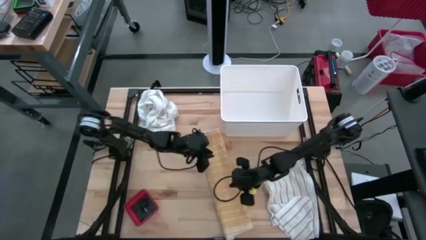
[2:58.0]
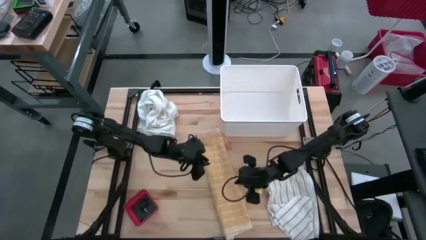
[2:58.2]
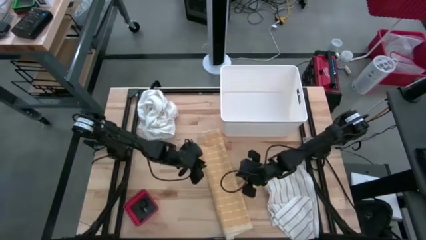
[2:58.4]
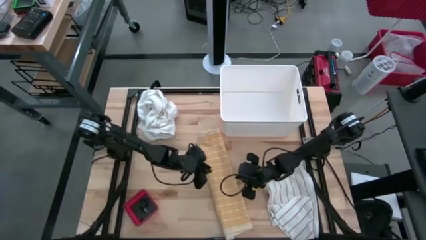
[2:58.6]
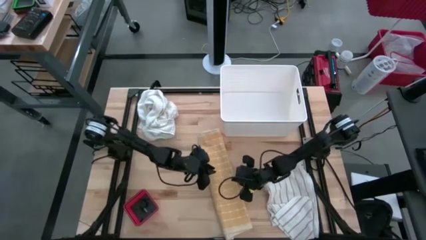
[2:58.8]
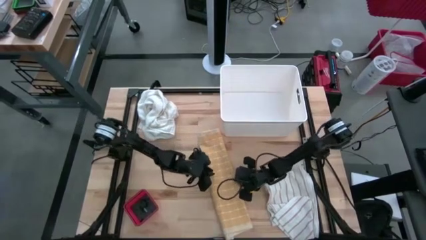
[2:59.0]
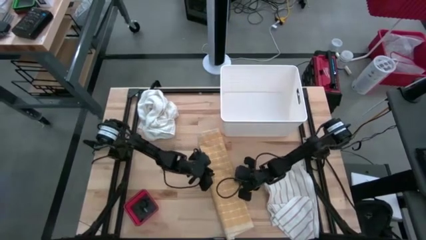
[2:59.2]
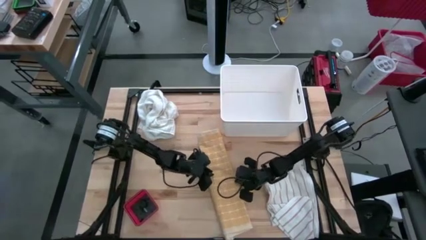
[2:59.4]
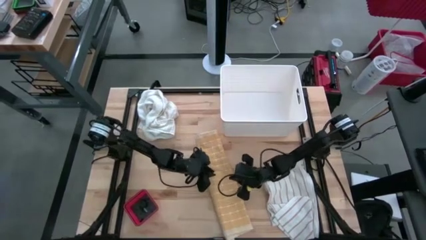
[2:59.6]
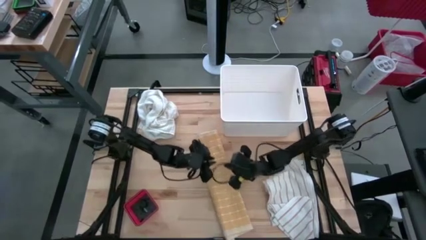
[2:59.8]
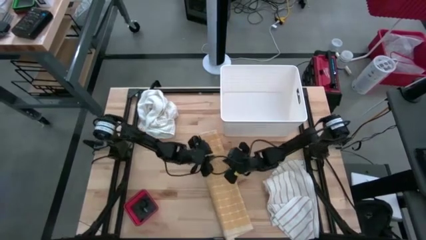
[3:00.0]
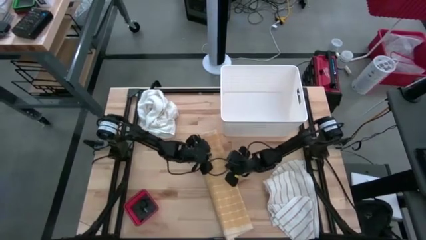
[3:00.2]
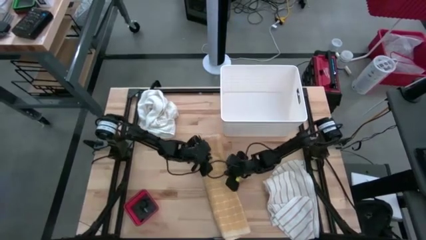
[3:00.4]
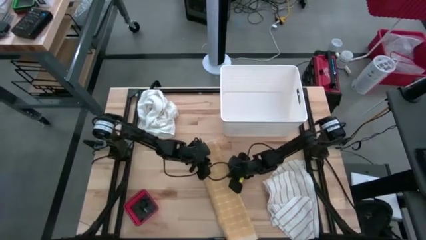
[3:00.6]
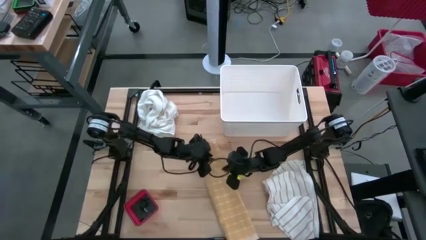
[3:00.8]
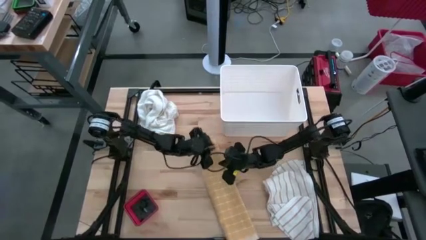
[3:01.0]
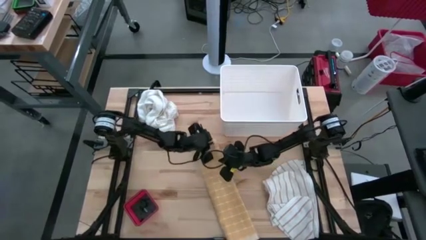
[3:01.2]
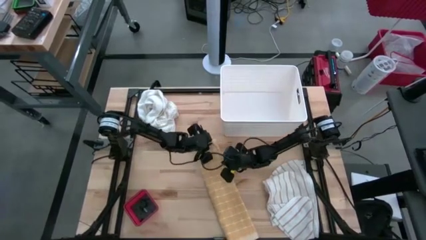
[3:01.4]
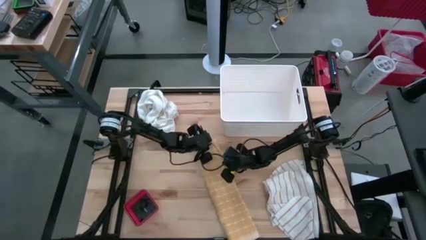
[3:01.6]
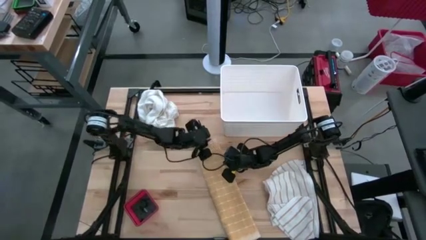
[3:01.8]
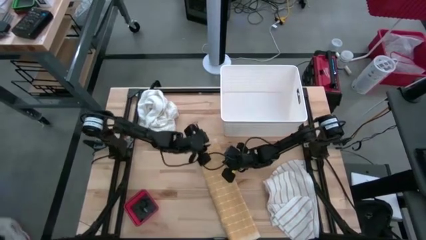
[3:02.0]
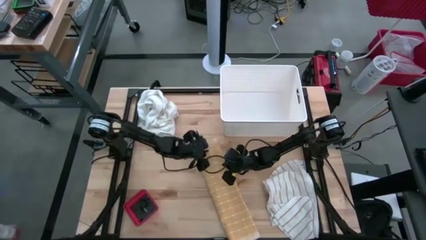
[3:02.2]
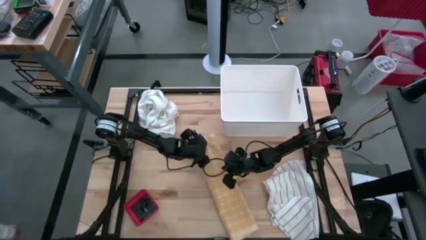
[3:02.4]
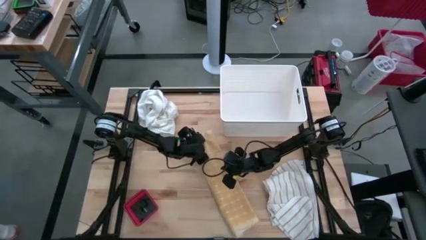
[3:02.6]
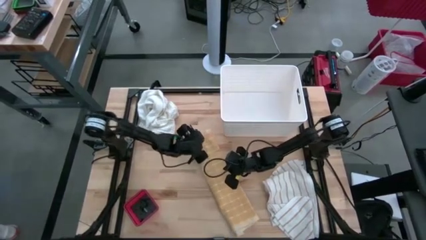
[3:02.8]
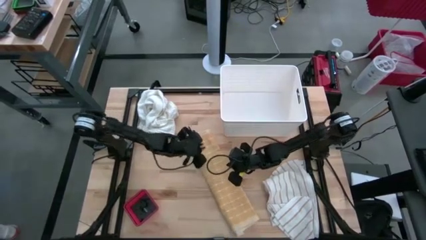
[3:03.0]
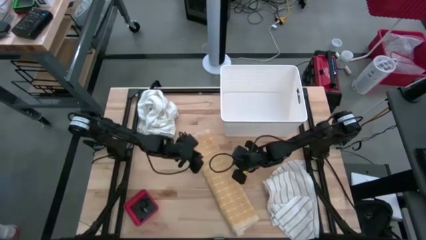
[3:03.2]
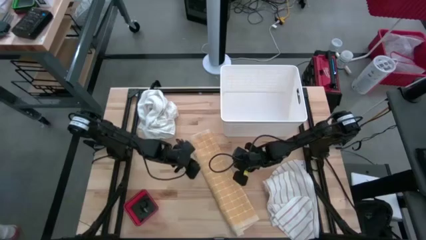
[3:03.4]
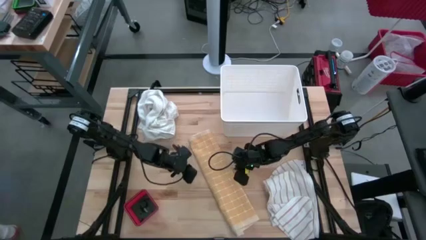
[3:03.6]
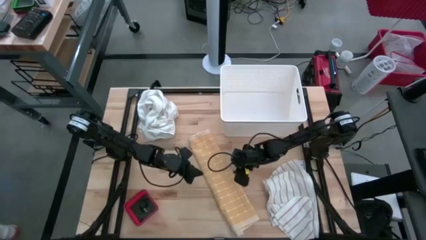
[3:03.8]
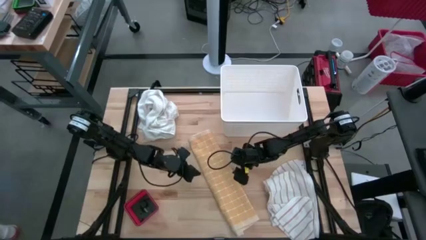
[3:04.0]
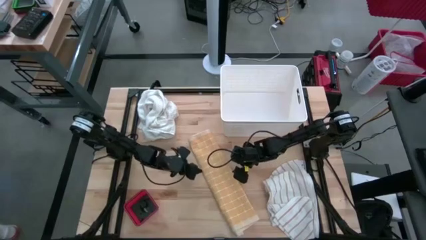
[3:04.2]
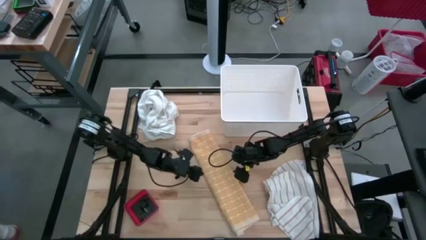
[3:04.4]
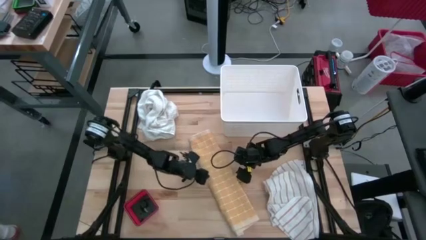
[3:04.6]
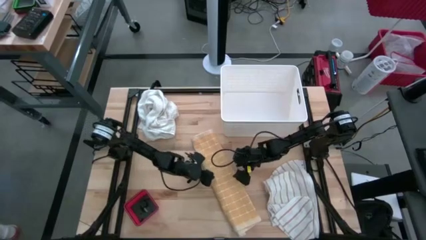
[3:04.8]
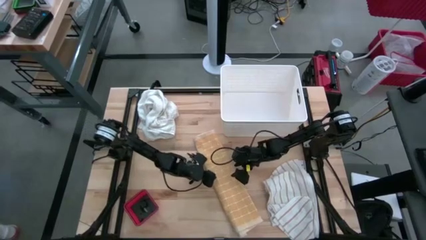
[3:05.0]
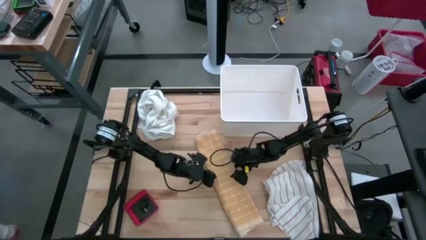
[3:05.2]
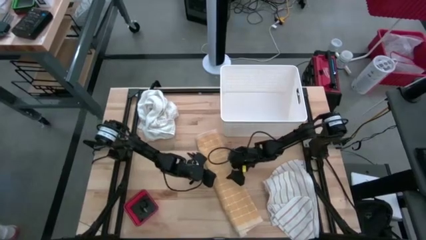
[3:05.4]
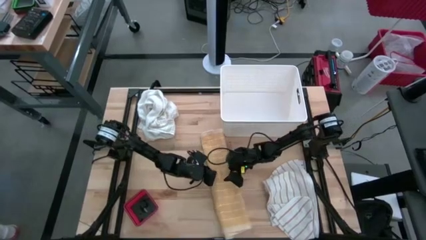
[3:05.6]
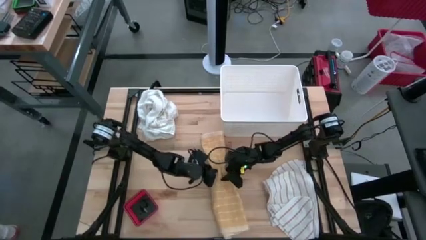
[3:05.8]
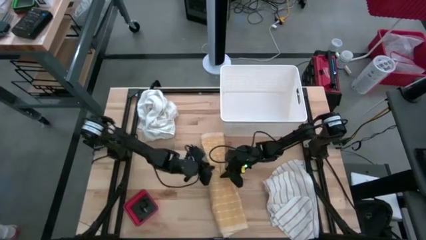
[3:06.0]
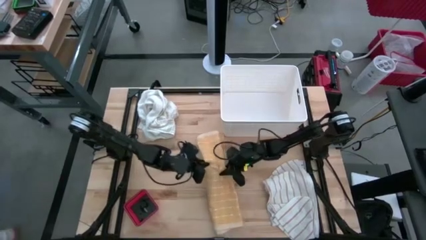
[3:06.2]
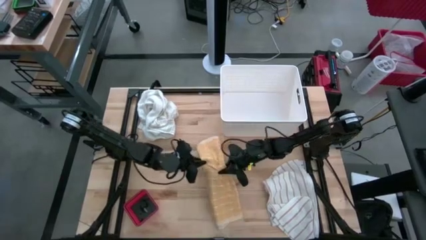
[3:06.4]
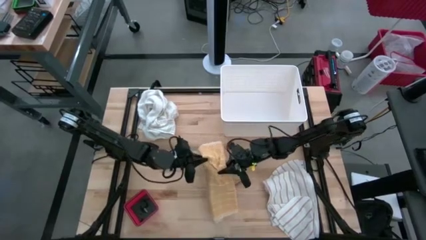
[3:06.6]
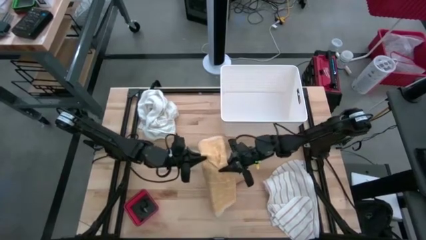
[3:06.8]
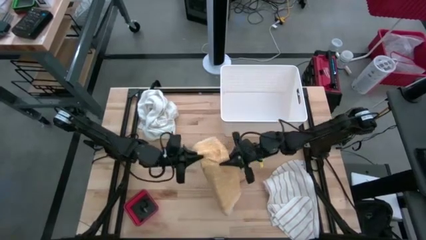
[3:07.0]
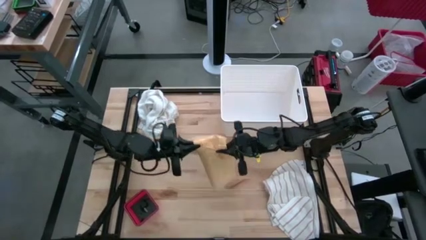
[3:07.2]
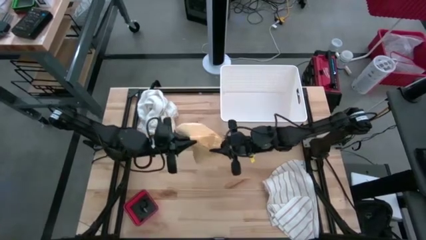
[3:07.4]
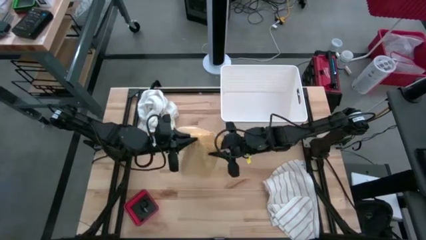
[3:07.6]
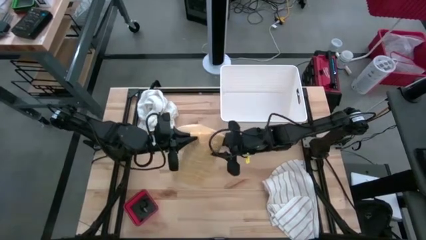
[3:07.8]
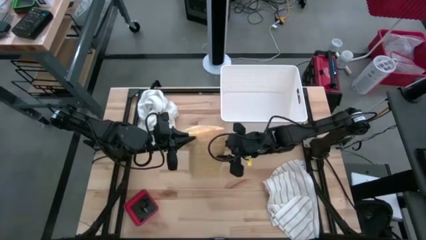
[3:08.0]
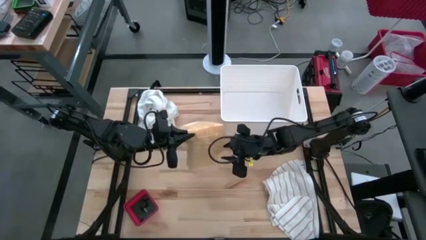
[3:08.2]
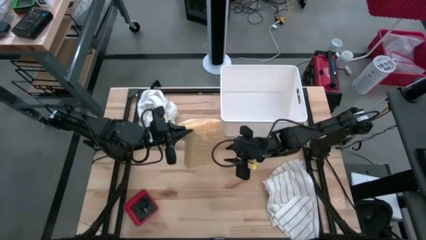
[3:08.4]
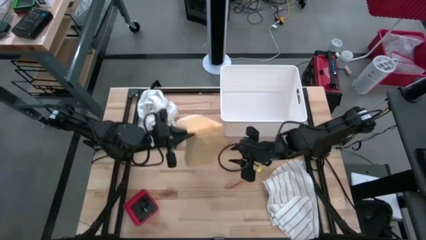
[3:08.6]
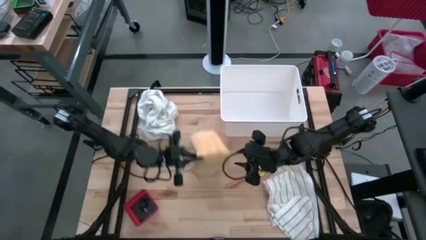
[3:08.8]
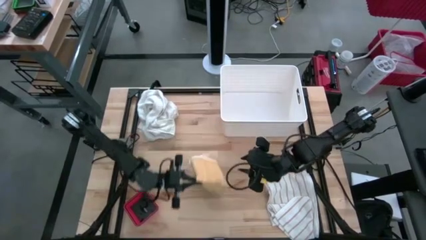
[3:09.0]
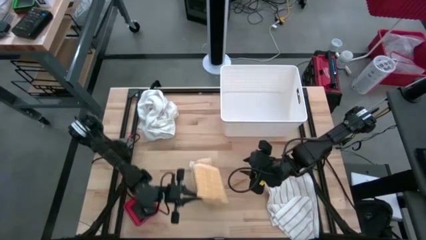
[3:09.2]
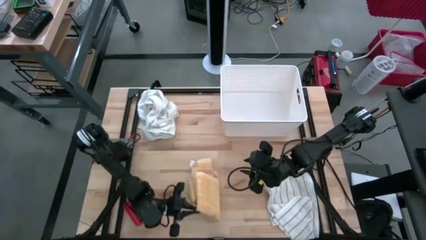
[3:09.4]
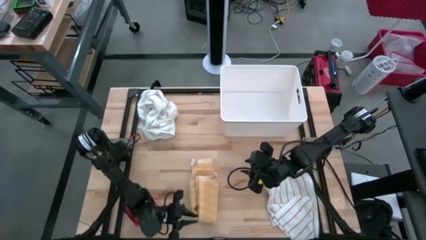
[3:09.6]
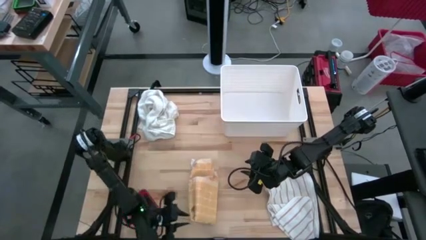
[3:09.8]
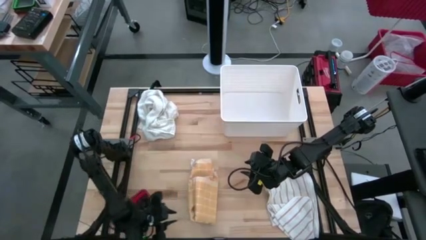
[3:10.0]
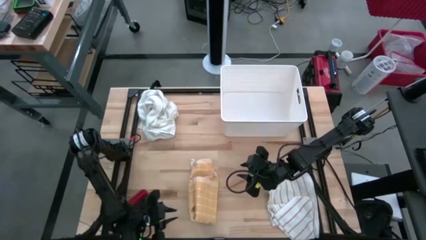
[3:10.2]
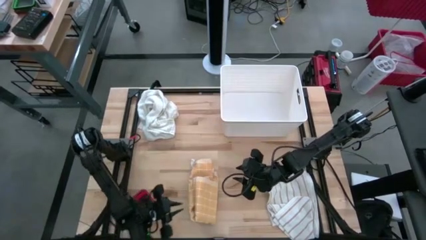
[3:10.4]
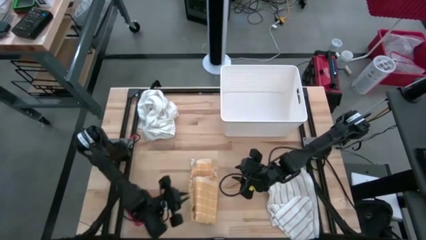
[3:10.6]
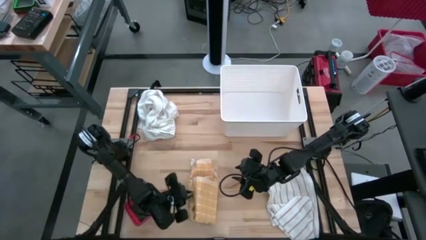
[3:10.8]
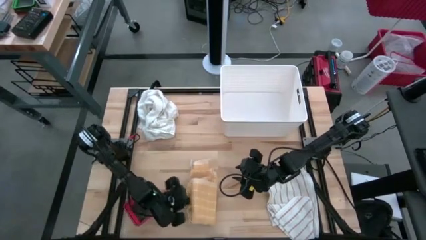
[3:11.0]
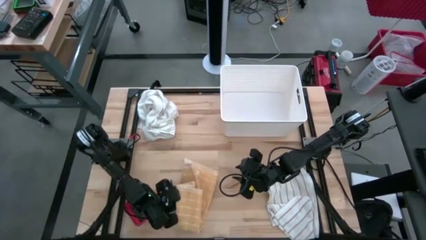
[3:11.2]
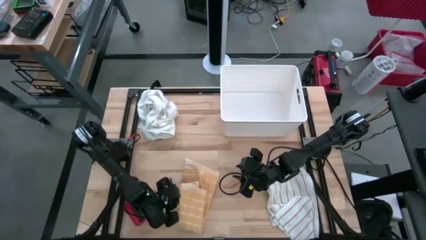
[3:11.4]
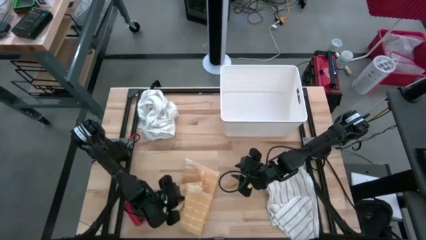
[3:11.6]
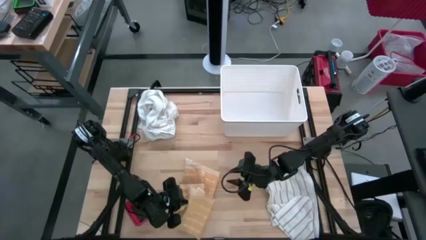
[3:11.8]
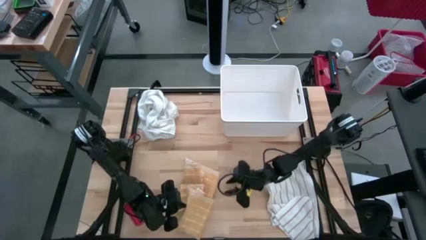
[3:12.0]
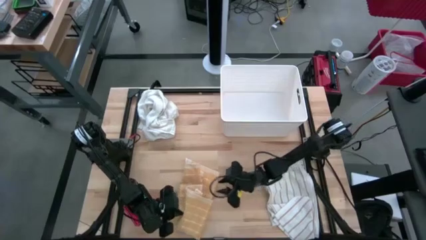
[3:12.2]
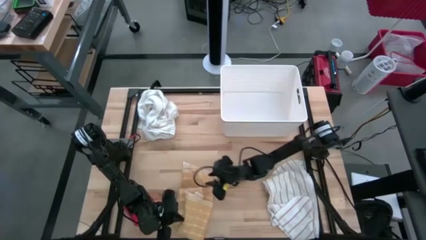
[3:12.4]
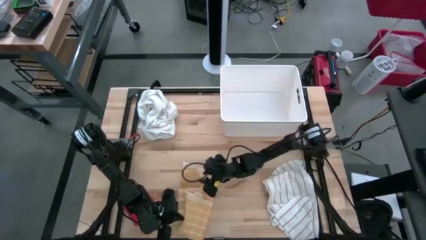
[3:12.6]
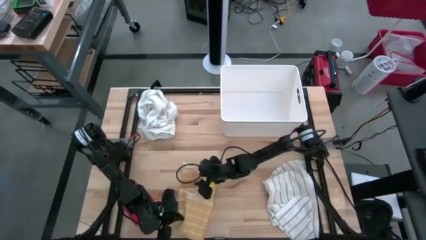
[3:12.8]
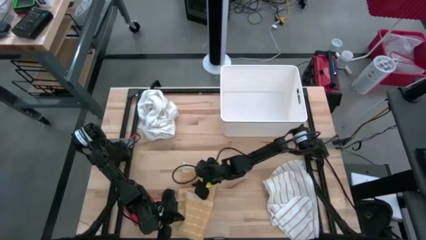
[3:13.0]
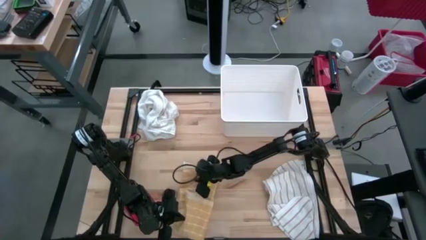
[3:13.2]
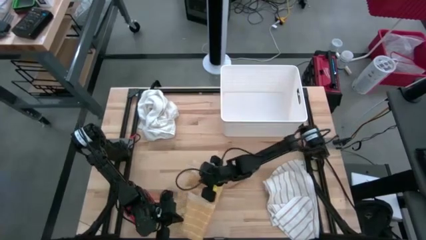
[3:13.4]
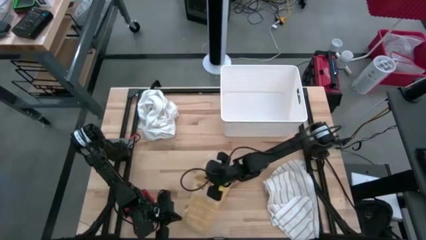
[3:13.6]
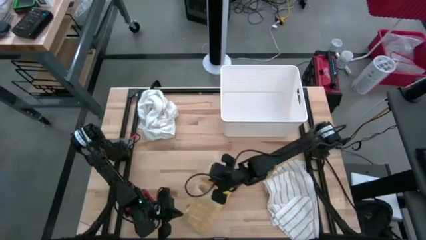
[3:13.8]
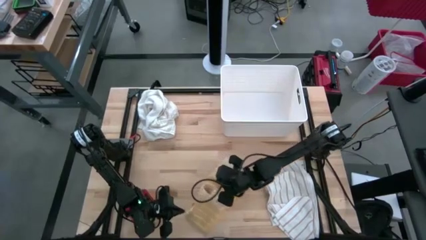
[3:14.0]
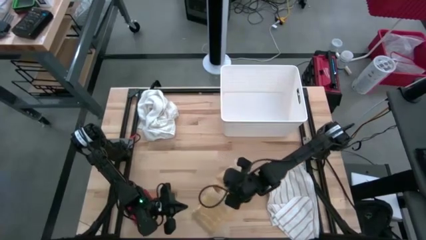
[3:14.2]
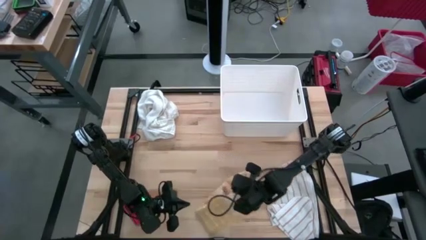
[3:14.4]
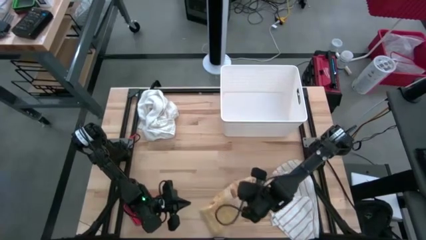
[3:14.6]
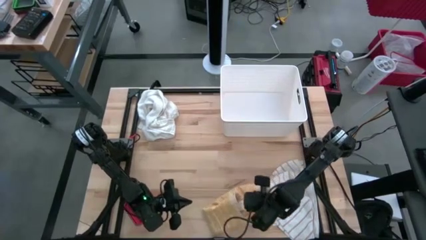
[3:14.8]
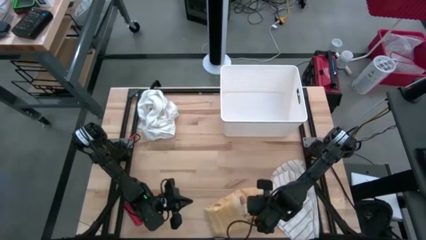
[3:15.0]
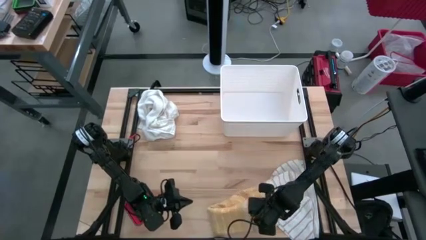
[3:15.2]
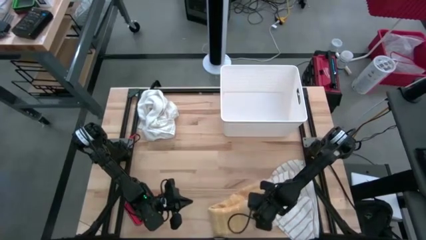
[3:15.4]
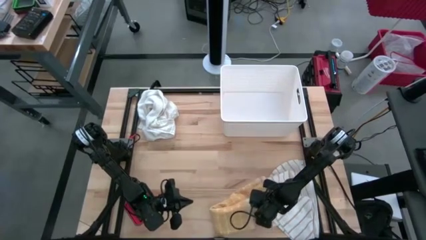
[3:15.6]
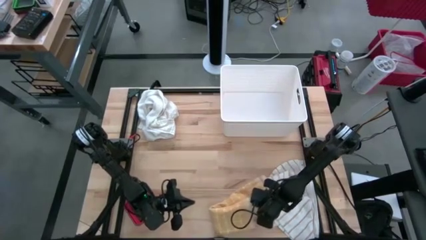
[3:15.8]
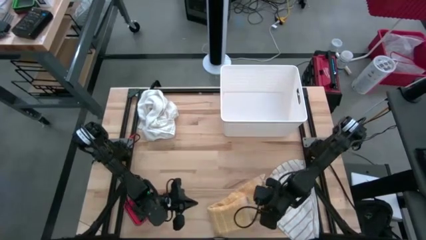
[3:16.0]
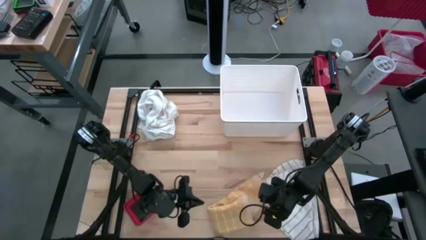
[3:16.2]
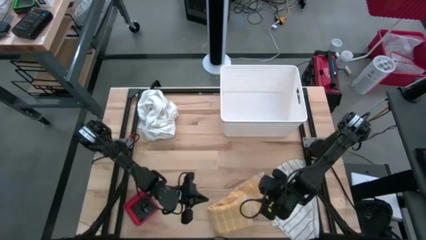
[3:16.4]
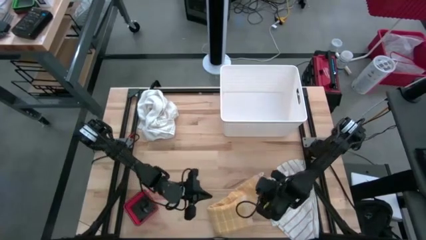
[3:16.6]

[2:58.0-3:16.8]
Task: Fold towel
Fold the yellow kitchen towel
